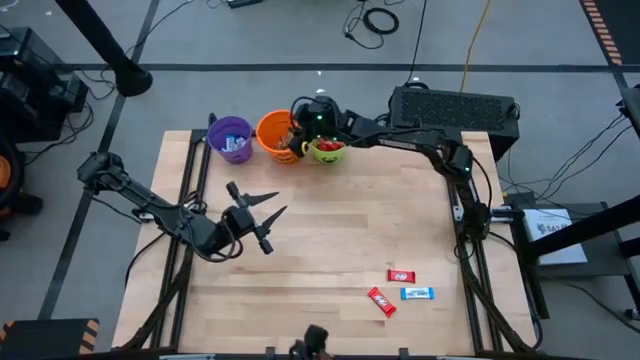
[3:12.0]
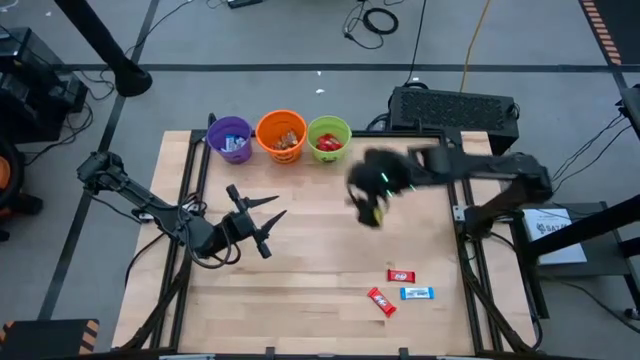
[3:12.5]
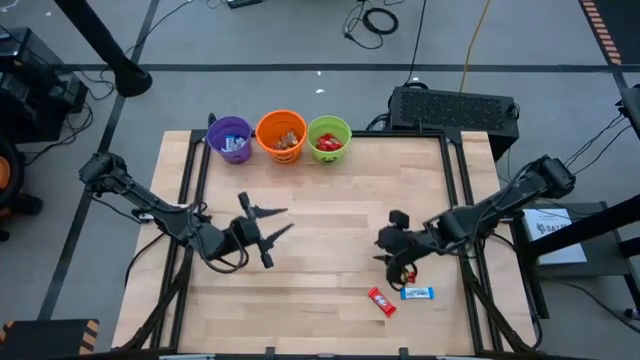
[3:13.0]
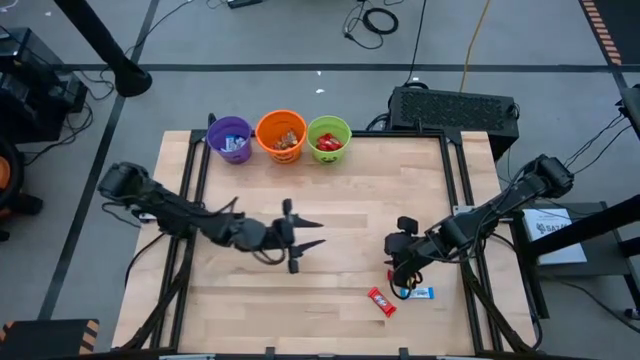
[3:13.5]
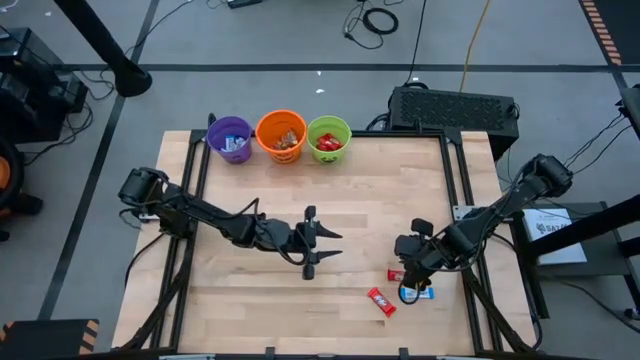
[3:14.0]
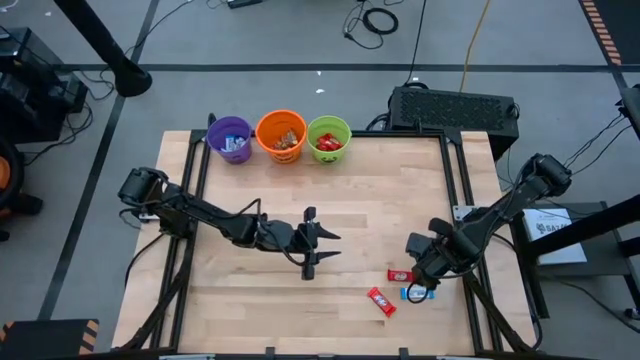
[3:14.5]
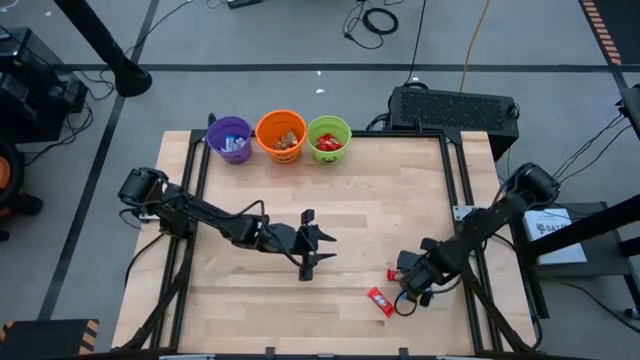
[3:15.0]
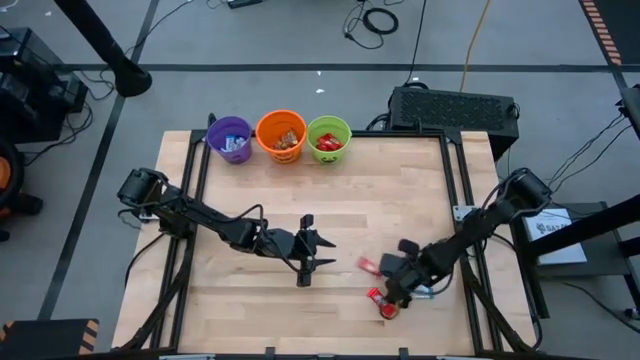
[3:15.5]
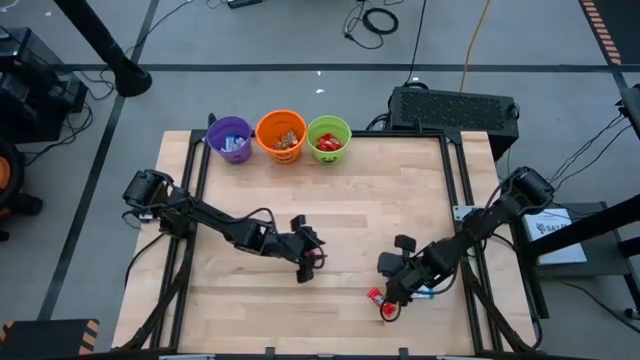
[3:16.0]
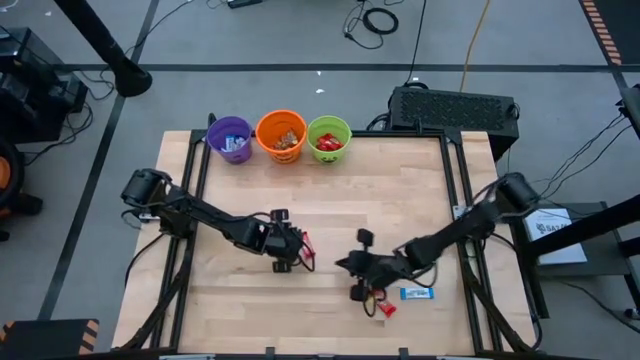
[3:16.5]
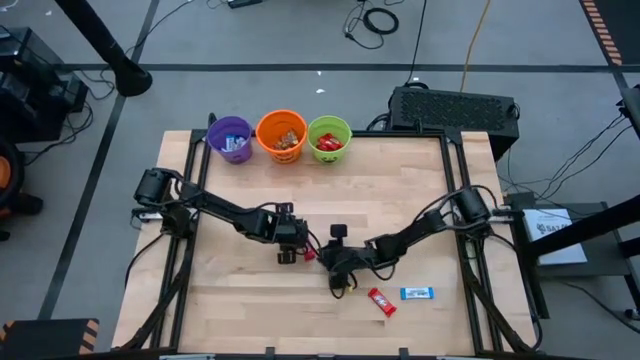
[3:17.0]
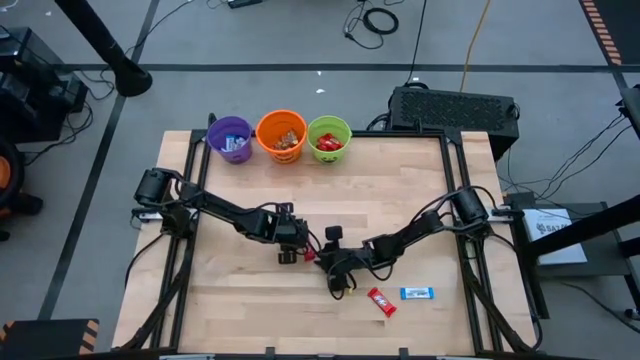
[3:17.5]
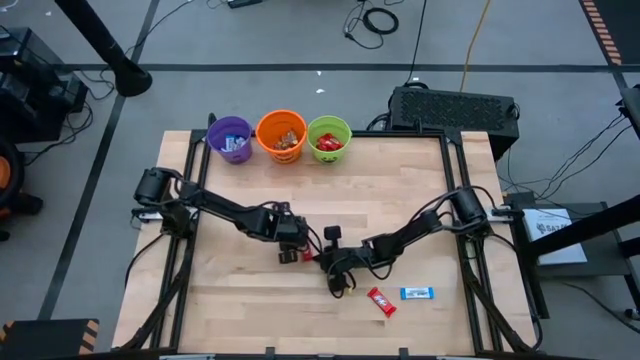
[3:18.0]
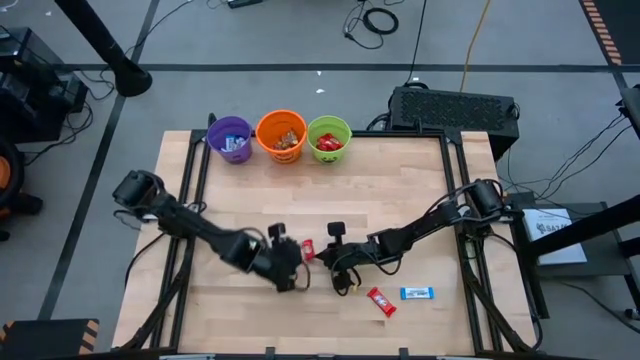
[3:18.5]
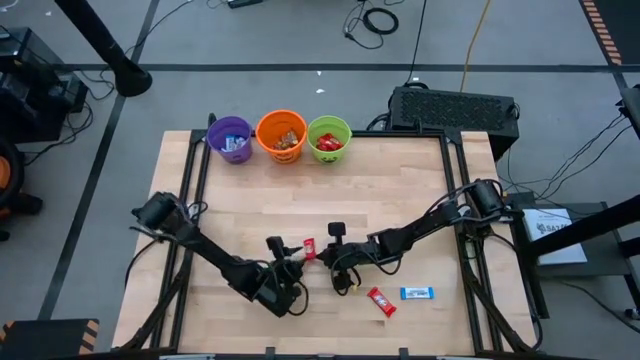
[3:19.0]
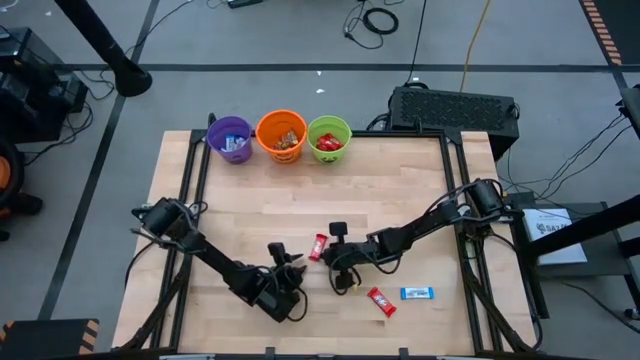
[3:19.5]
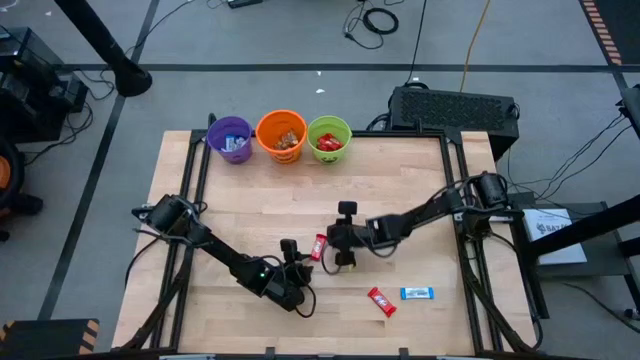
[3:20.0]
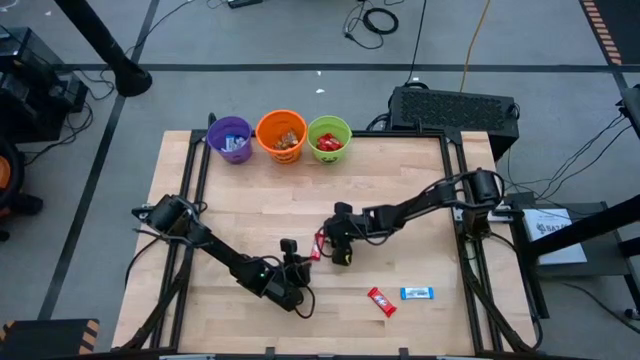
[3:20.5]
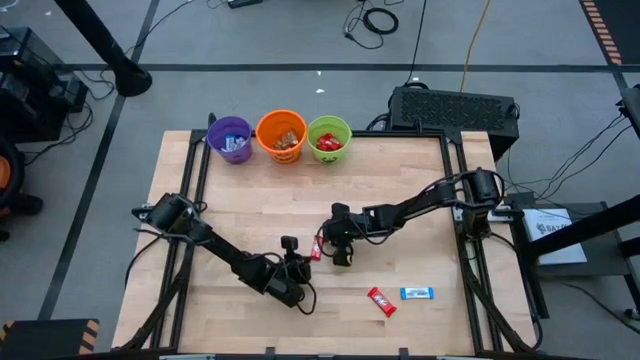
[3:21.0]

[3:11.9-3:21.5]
Task: Sort candy by brand, put in halloween buckets
Put the red chocolate bar into the green bucket

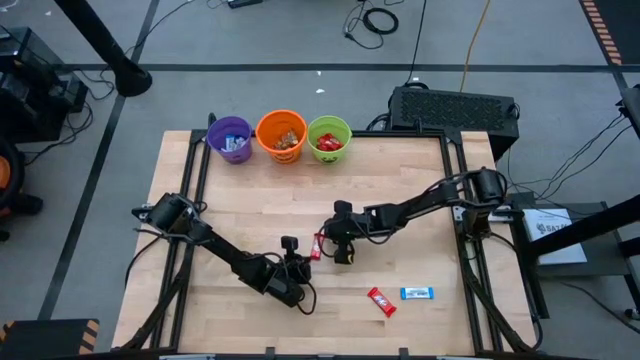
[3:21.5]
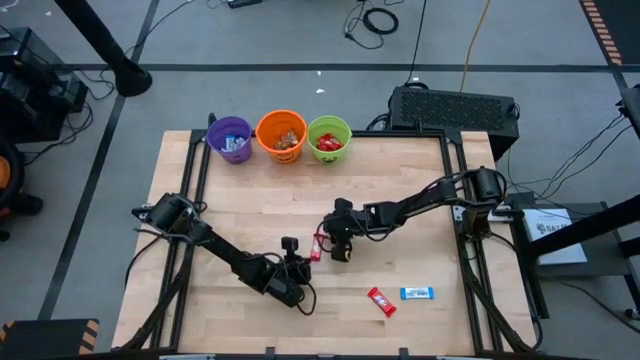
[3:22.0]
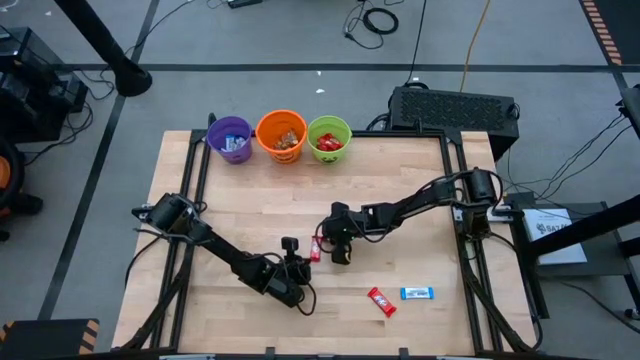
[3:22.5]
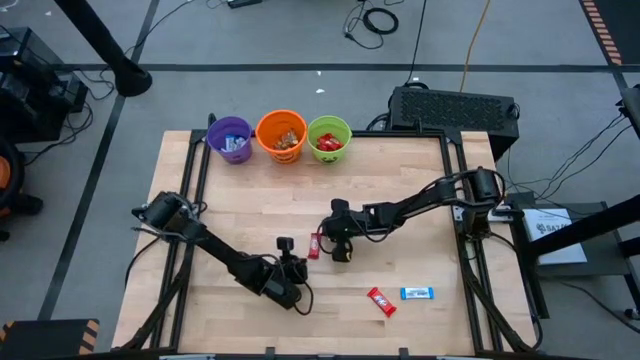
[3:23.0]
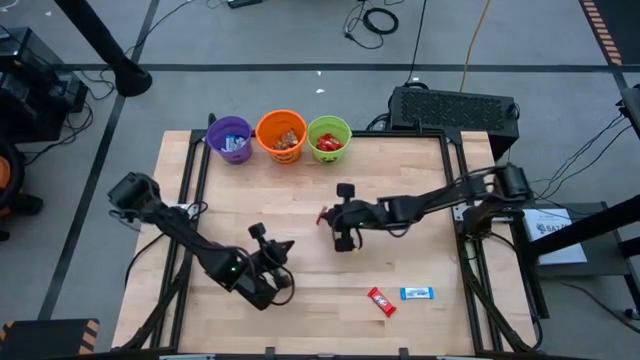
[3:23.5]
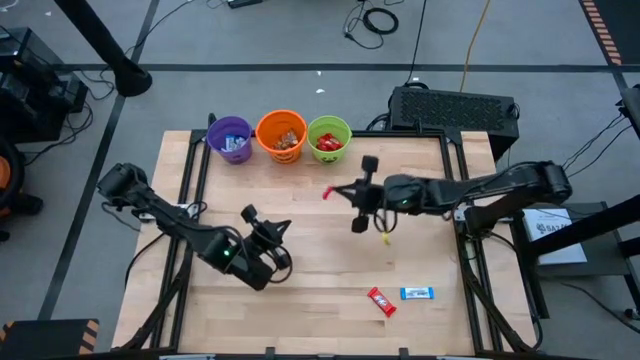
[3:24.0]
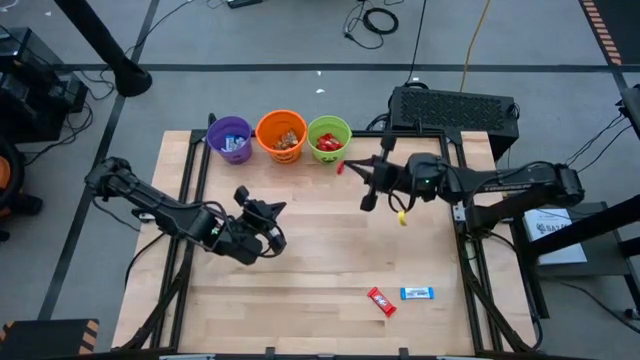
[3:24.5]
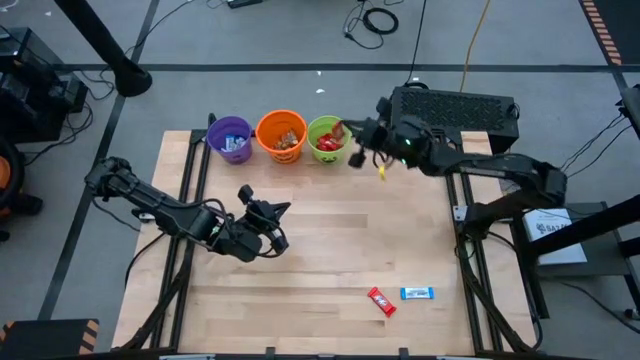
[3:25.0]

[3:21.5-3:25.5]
Put the red chocolate bar into the green bucket

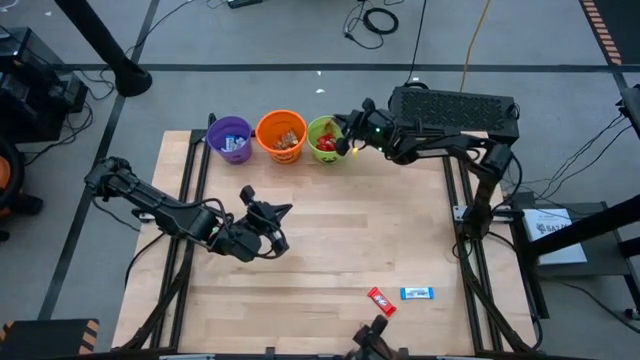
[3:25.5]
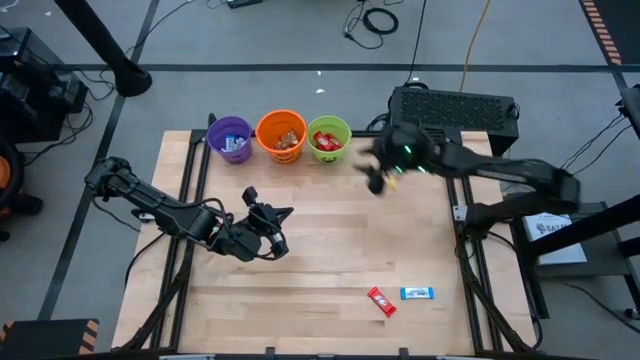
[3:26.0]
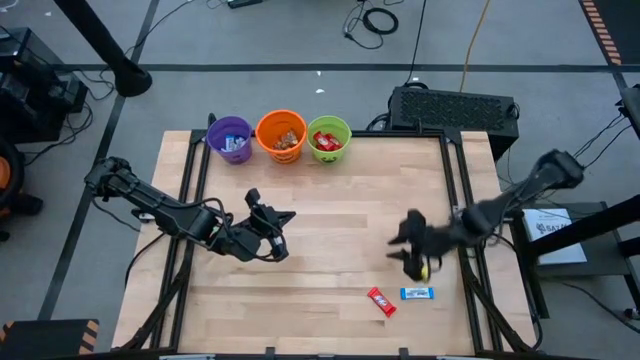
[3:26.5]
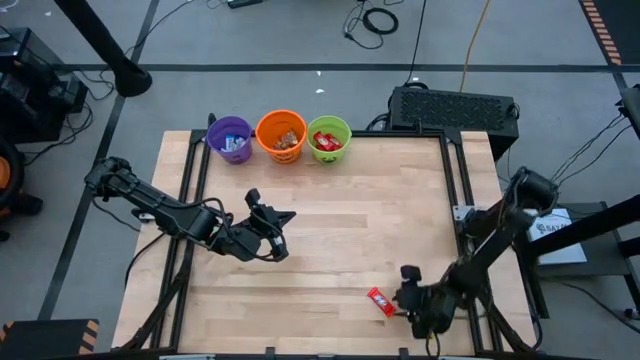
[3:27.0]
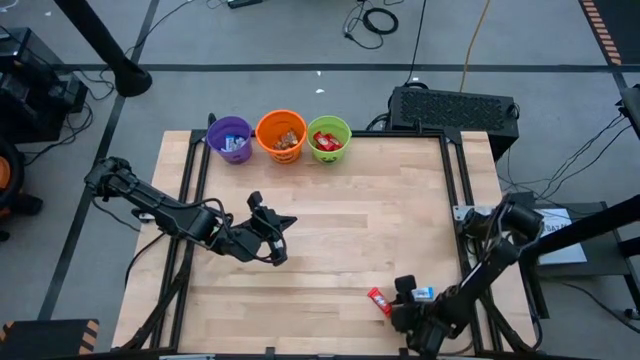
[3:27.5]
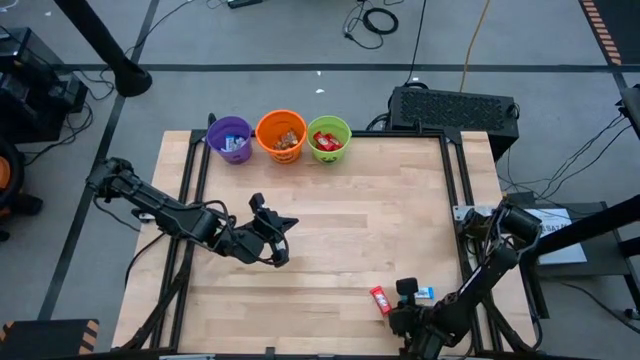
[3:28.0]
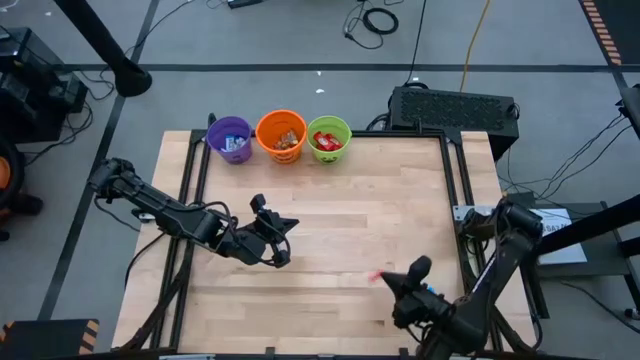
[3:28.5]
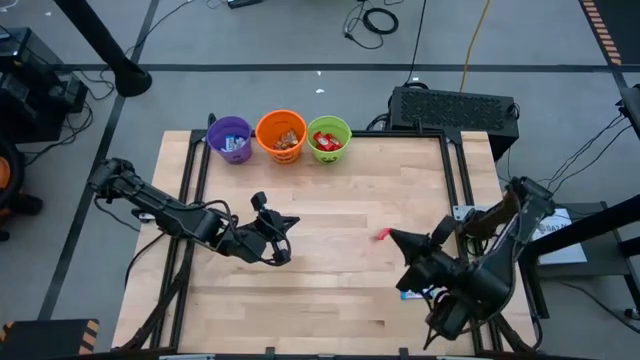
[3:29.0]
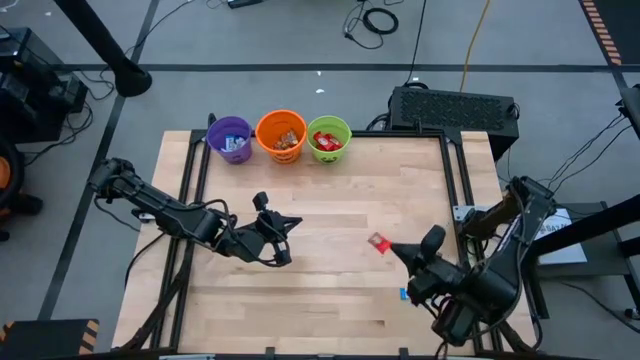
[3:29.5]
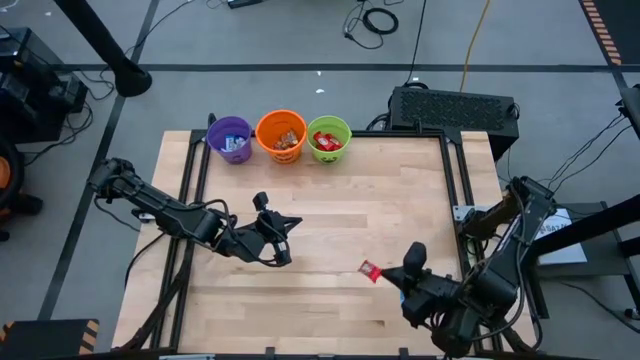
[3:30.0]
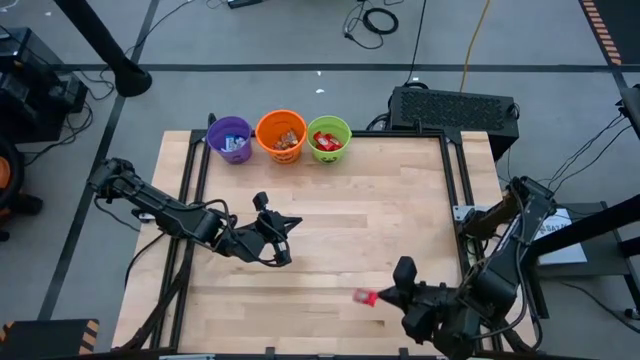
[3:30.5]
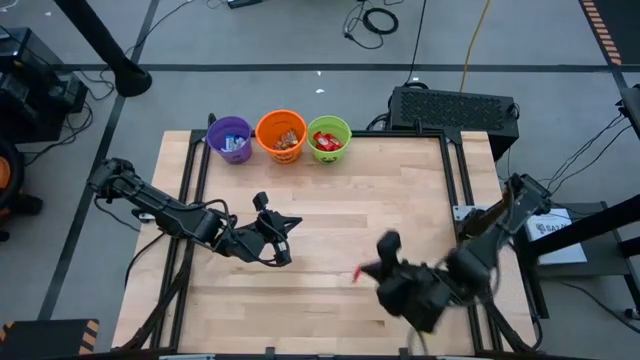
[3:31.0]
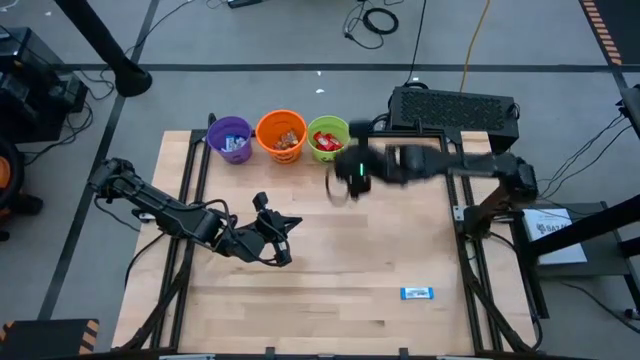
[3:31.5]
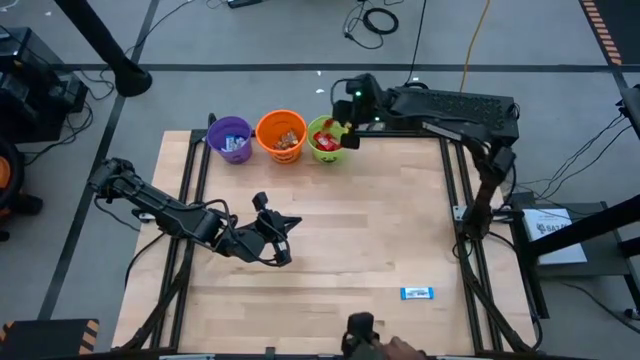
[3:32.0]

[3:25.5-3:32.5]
Put the red chocolate bar into the green bucket

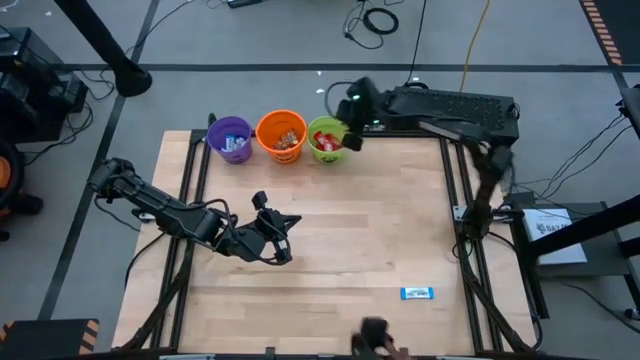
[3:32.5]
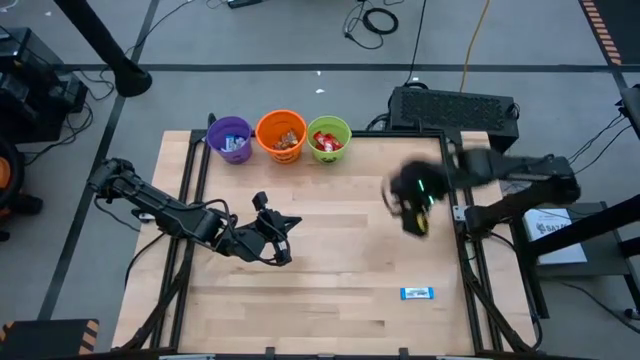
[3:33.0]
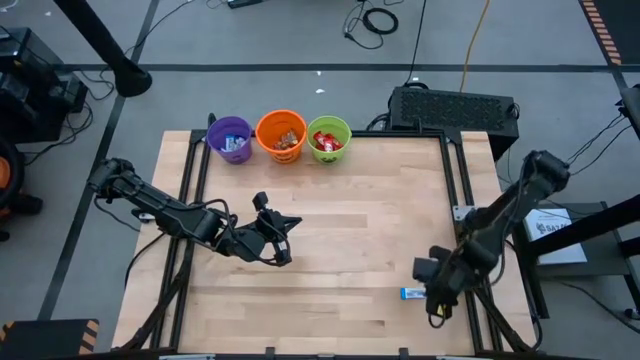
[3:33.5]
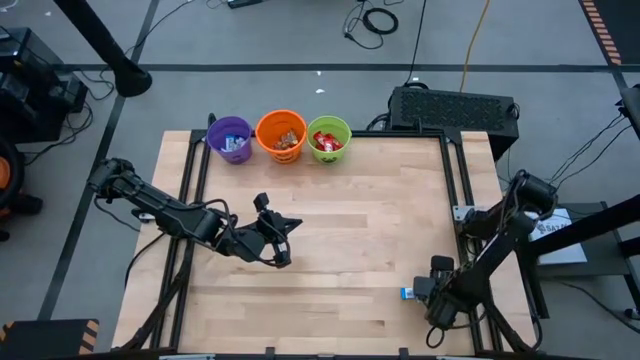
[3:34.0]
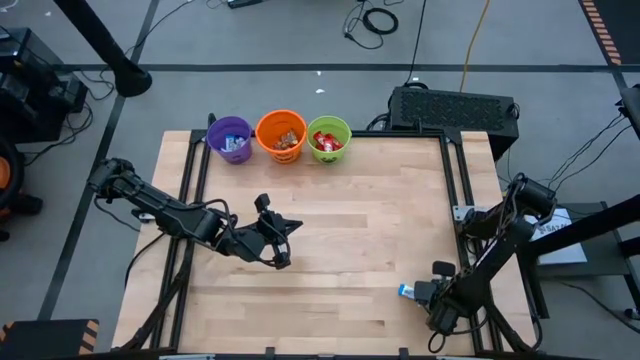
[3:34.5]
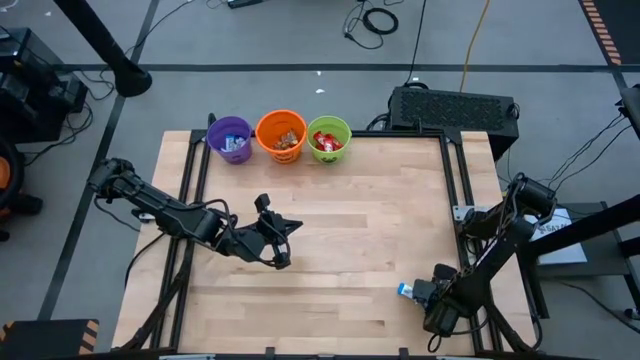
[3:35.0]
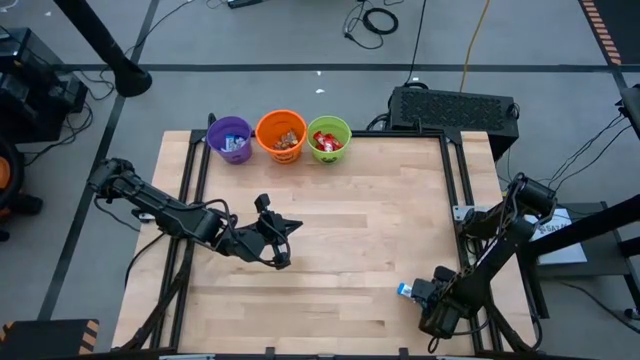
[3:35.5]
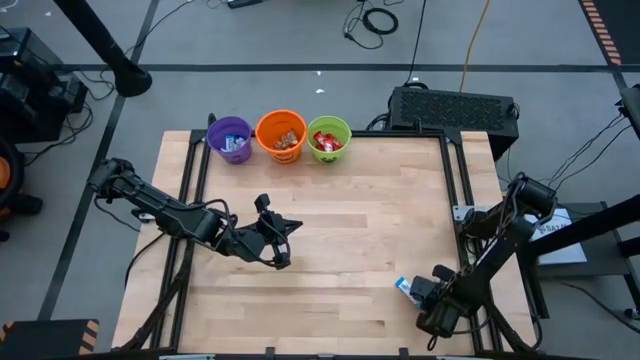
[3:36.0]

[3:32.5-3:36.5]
Put the white chocolate bar into the violet bucket
